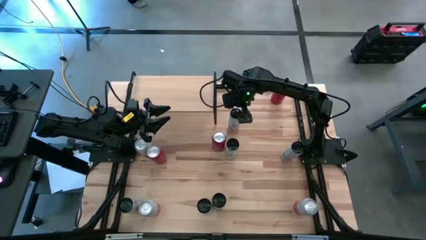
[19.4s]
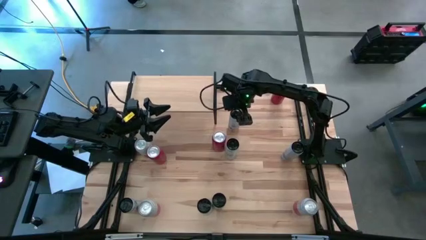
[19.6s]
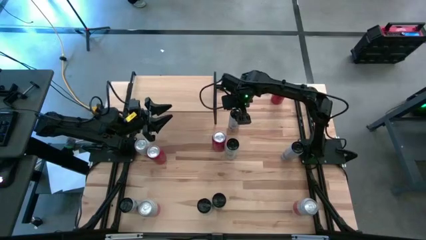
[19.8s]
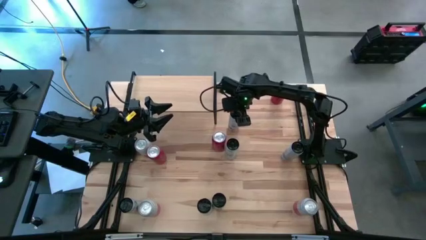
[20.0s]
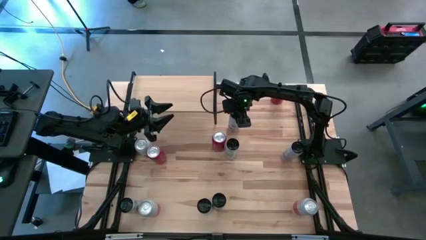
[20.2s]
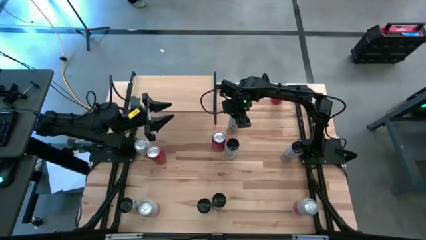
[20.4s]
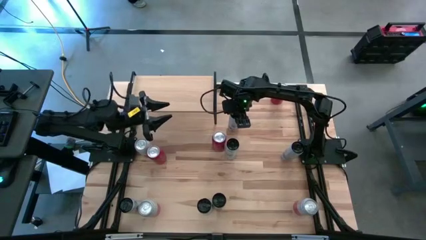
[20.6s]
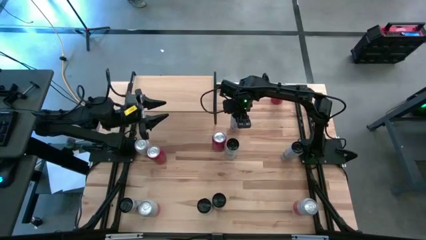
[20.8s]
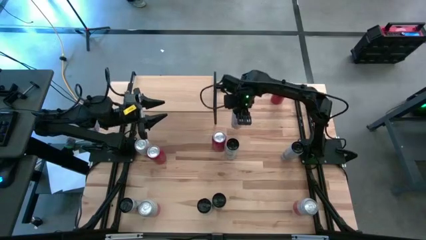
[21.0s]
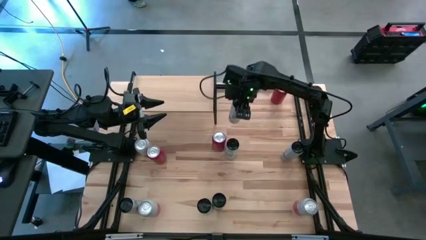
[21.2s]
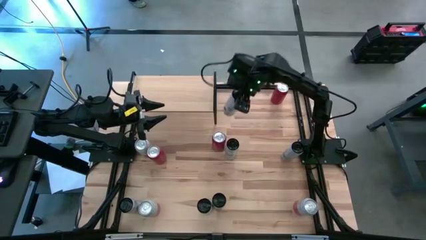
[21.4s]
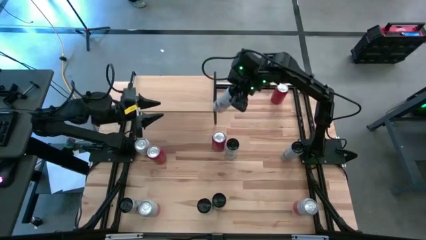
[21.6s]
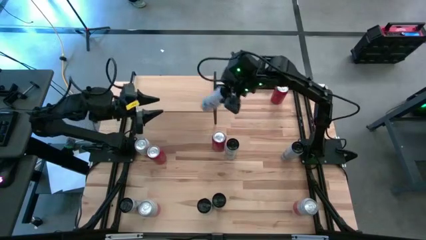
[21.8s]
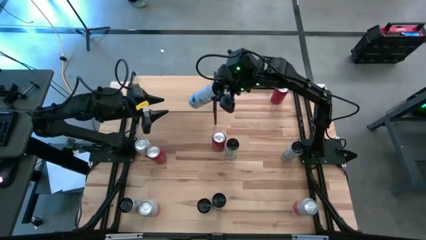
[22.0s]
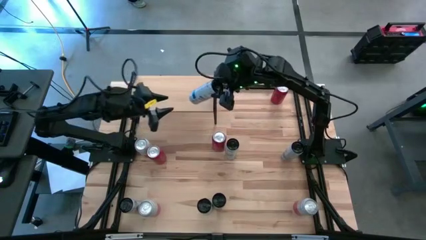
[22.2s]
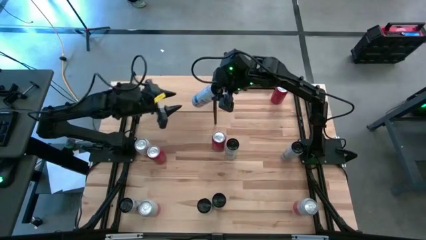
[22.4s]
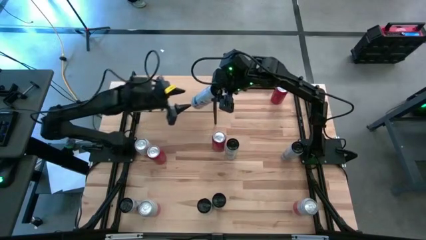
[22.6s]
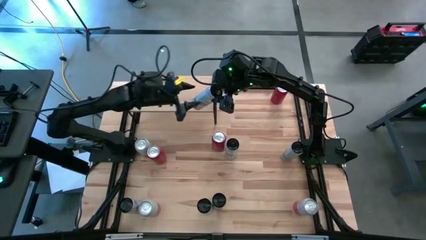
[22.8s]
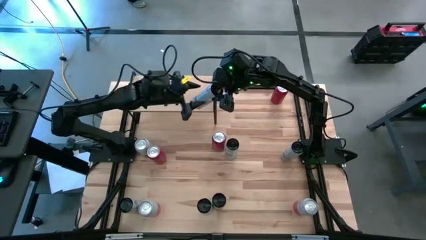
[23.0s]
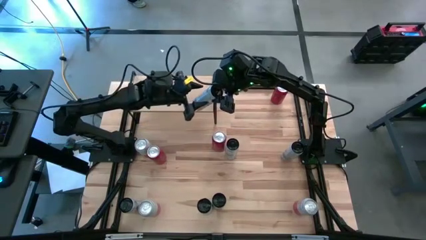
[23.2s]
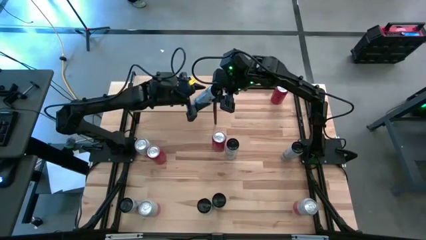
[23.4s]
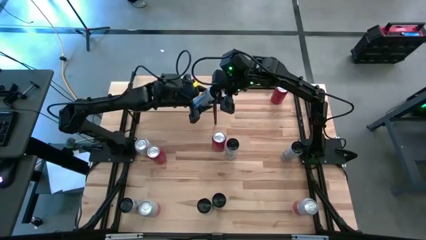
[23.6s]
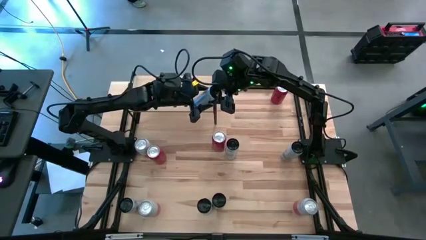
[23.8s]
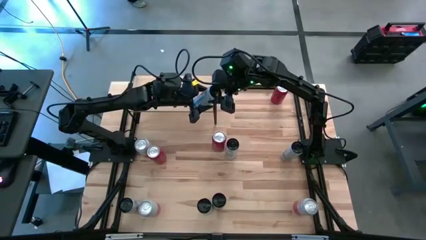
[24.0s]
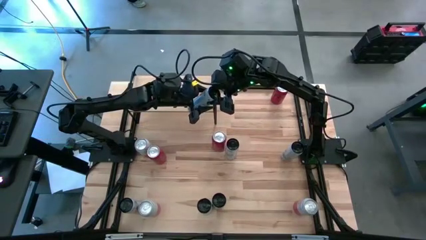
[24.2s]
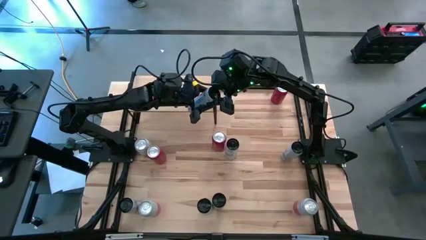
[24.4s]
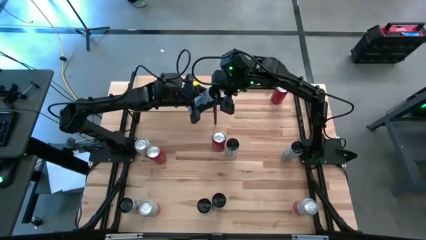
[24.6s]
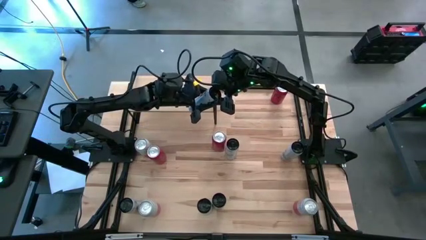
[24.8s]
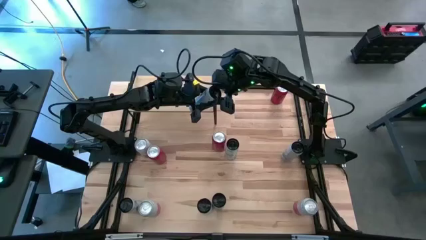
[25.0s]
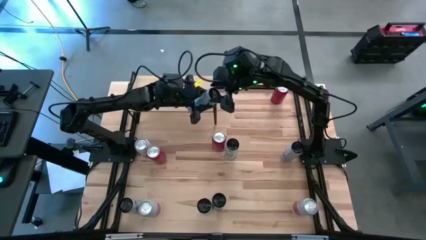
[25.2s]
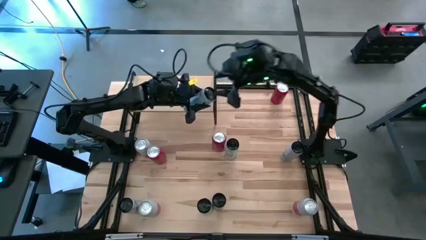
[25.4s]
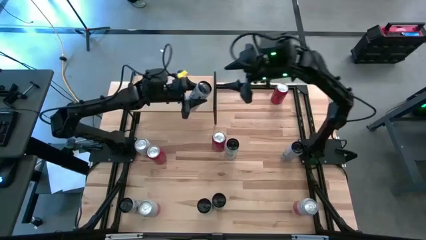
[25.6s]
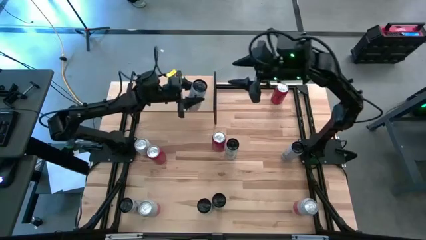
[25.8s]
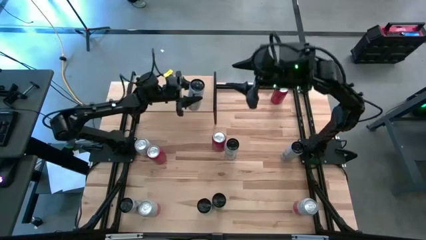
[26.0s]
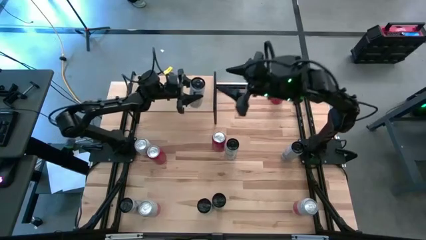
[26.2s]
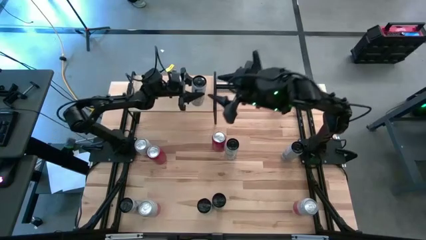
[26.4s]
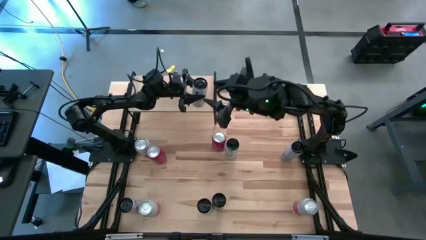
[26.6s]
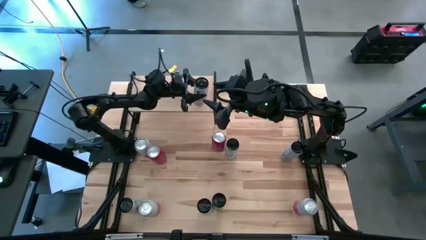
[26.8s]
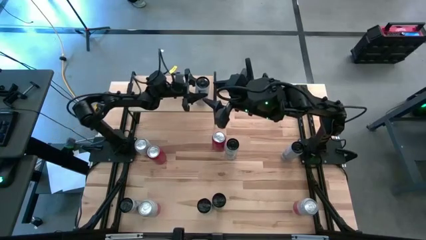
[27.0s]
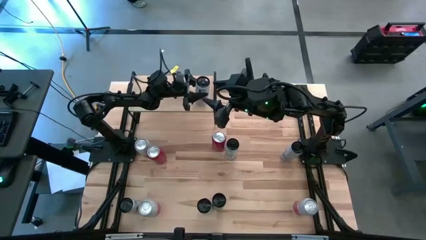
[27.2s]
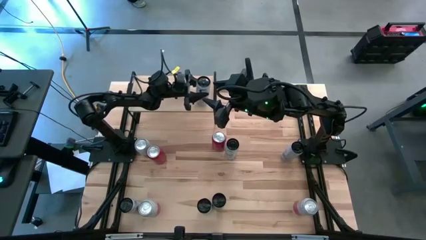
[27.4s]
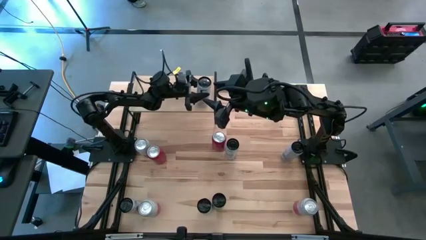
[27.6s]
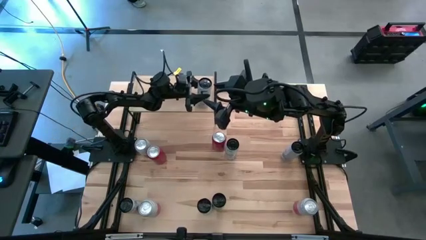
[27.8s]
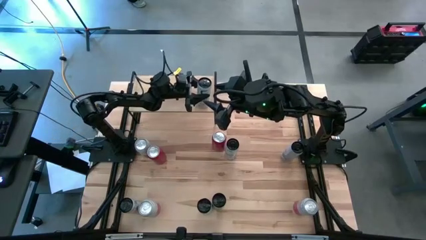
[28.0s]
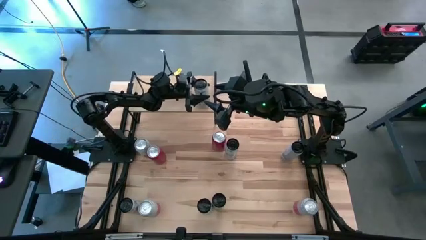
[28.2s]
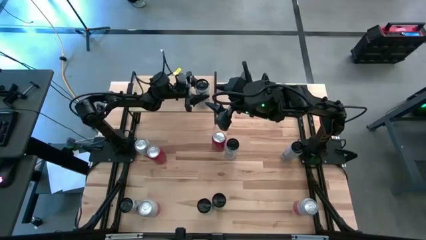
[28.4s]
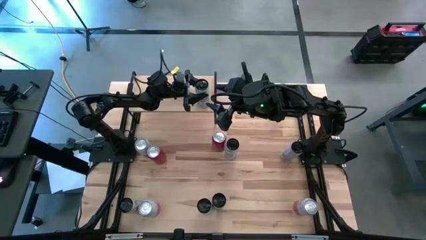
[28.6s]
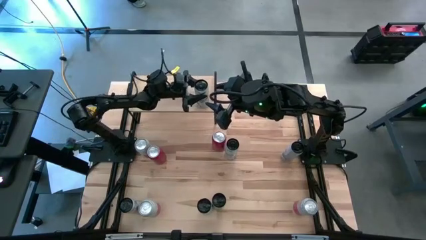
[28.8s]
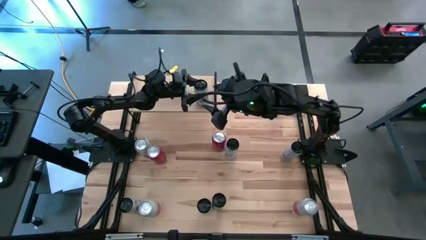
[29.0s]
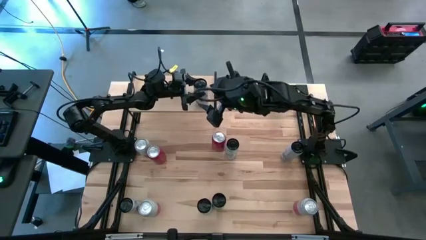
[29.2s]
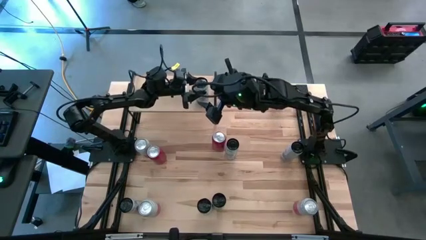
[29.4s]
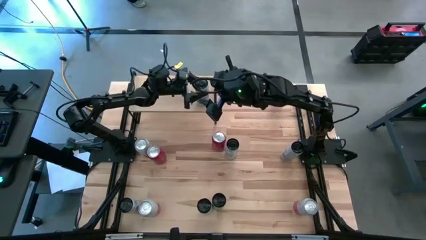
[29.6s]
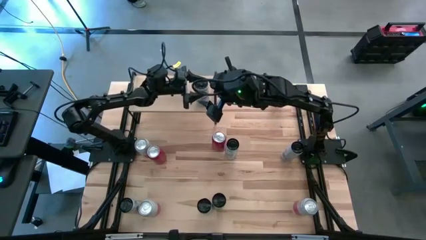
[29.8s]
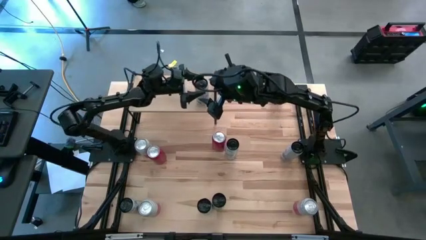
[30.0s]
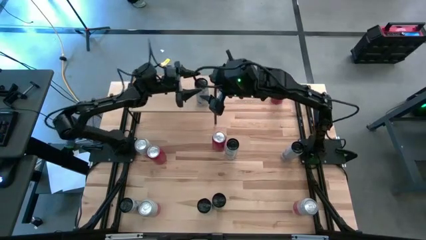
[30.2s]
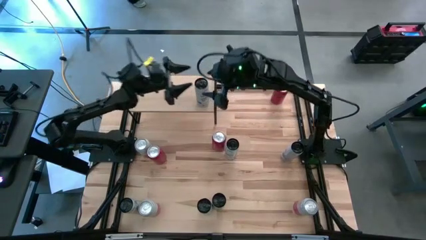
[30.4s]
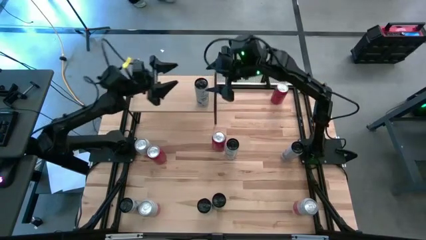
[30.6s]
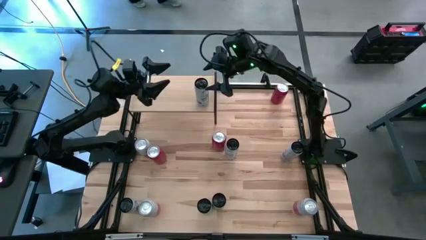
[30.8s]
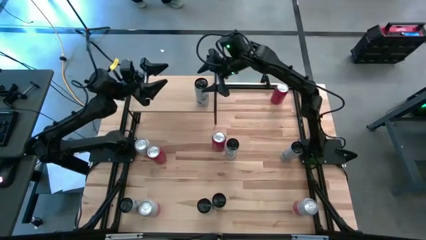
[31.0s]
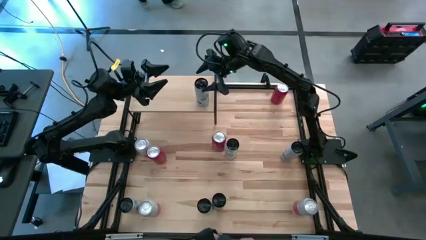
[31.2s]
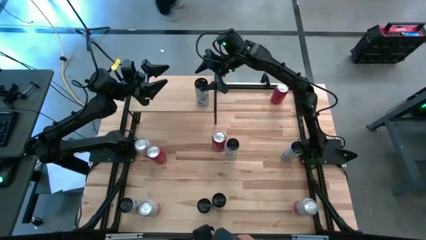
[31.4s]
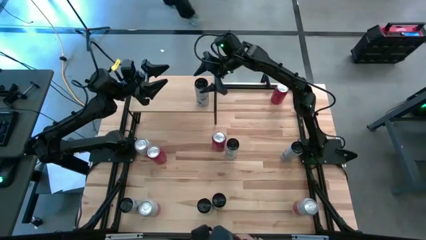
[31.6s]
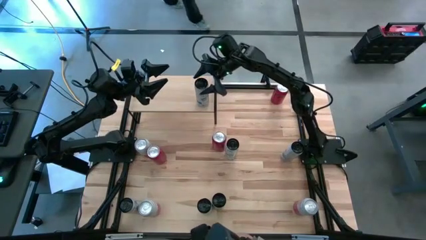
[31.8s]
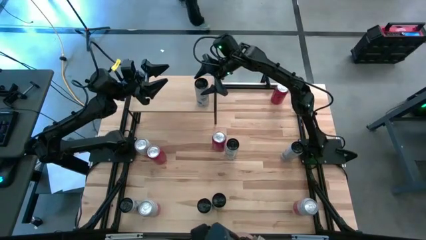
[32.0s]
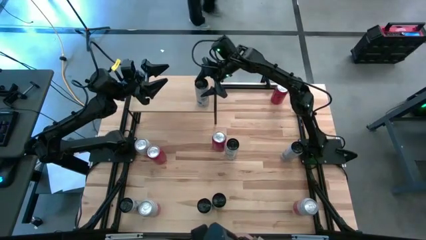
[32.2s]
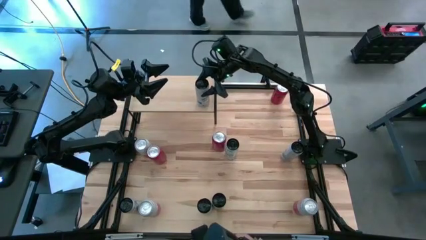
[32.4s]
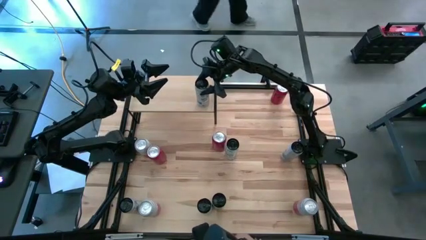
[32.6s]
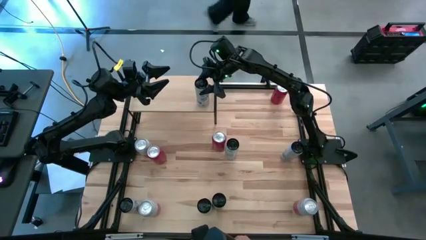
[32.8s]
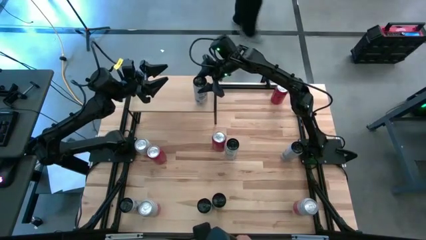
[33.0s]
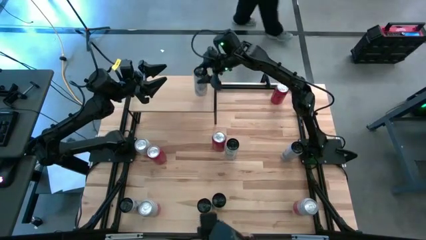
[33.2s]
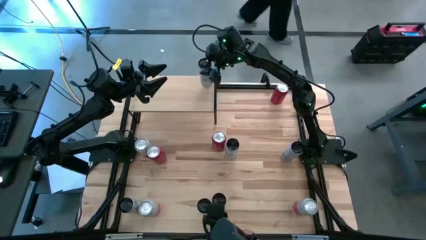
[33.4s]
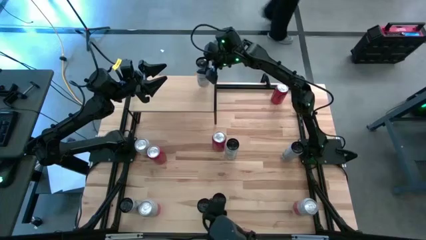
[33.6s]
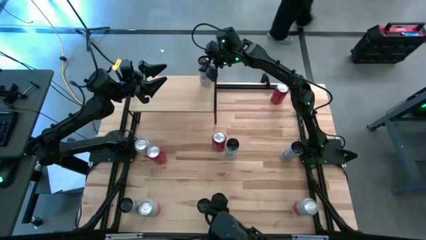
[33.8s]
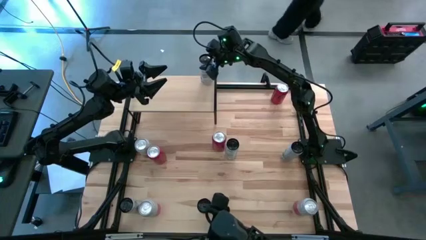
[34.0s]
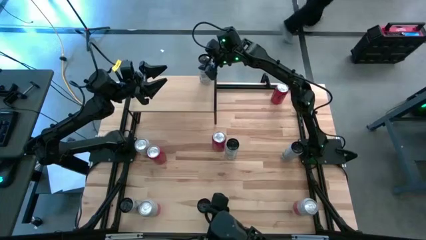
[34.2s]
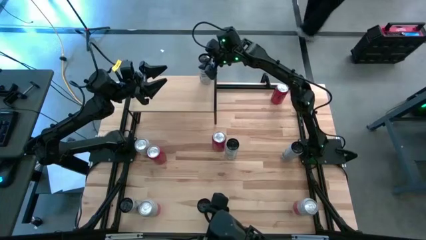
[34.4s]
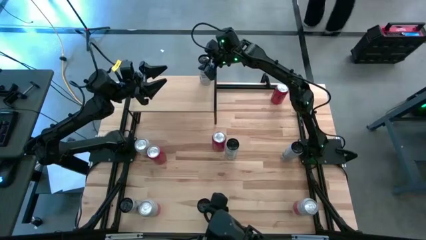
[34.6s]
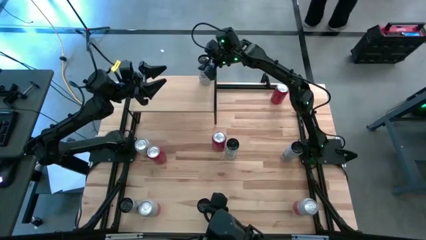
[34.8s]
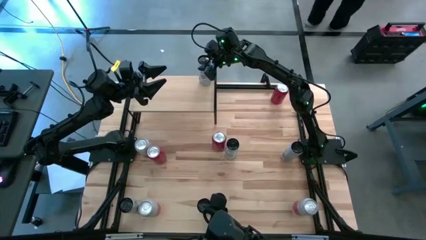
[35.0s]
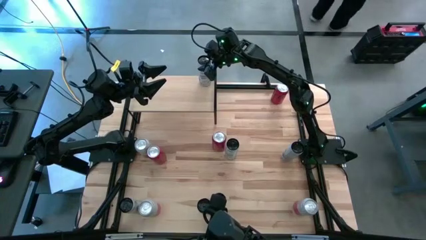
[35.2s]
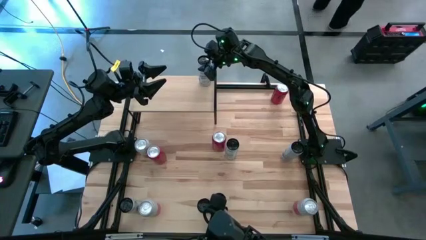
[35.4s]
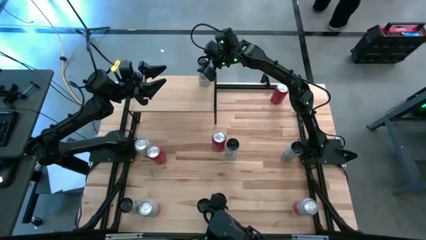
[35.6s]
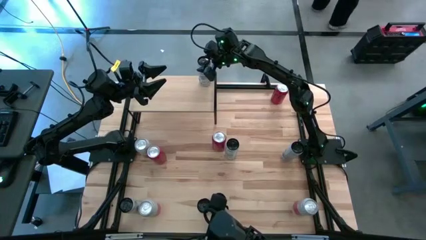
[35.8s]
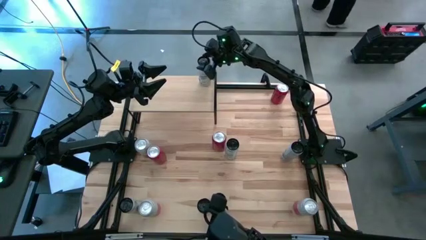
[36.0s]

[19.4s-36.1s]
Task: Place canned beverage on shelf
Put the top blue soda can on the shelf
